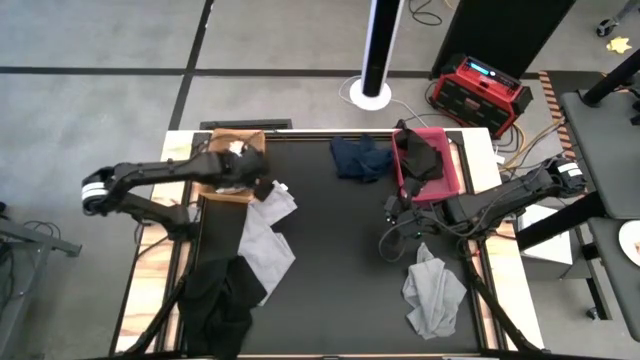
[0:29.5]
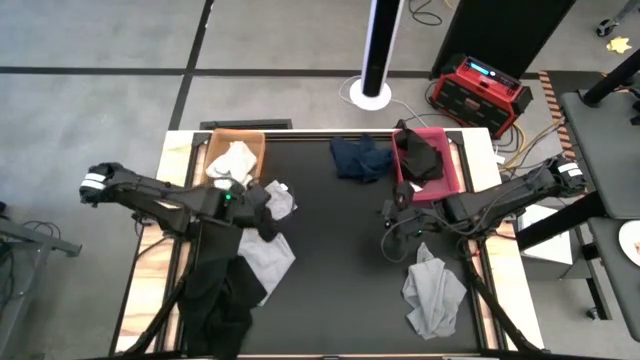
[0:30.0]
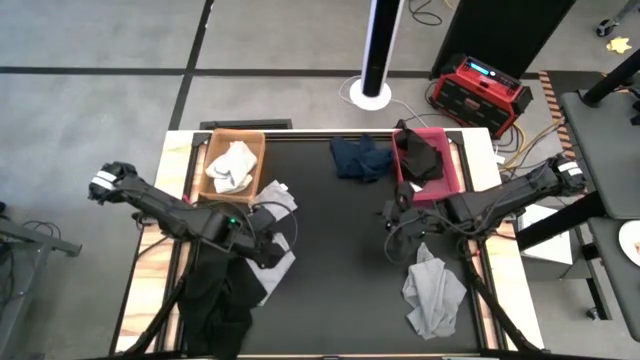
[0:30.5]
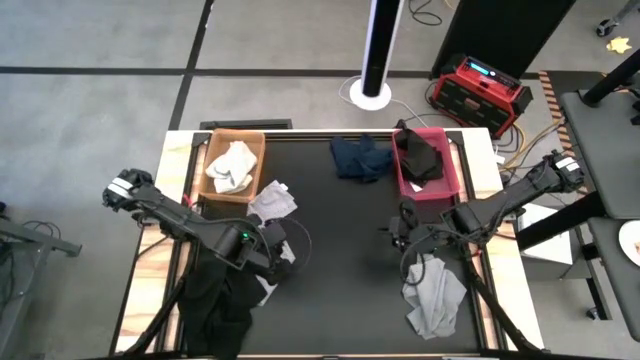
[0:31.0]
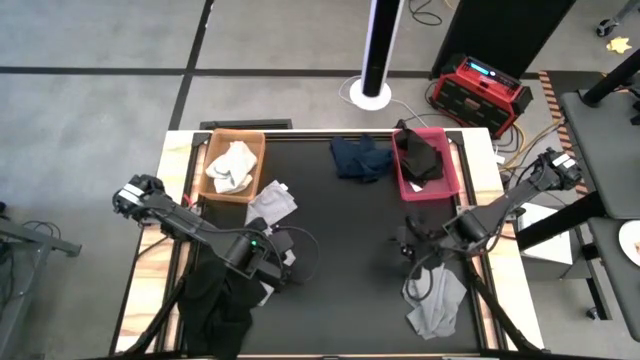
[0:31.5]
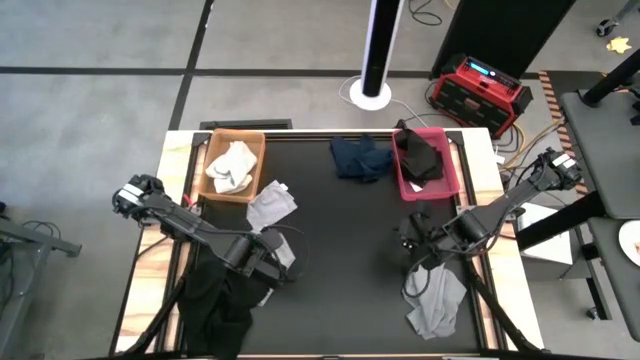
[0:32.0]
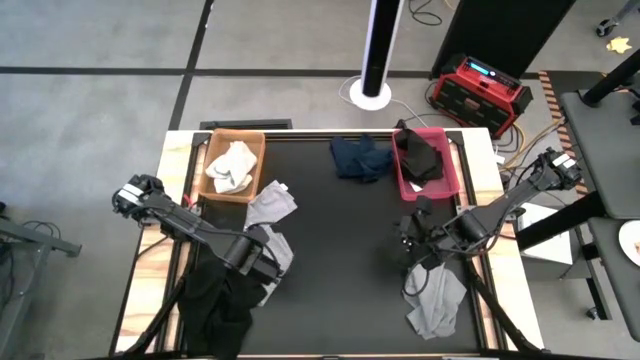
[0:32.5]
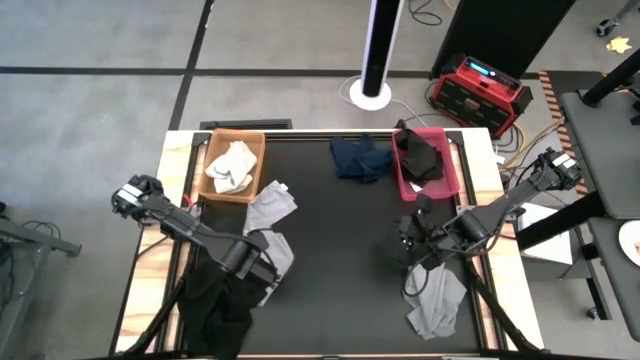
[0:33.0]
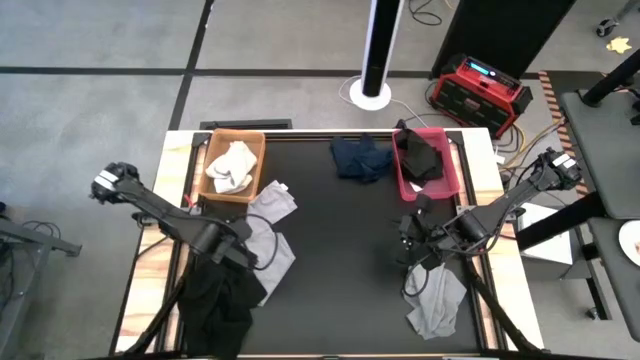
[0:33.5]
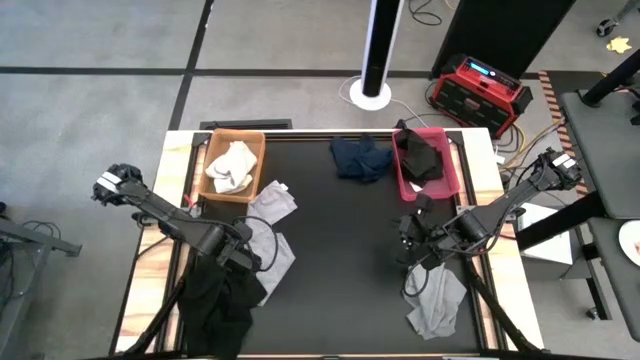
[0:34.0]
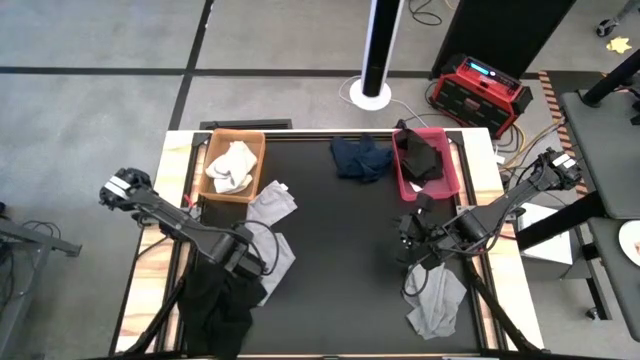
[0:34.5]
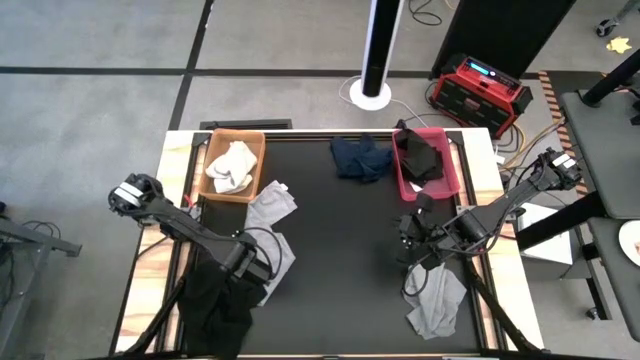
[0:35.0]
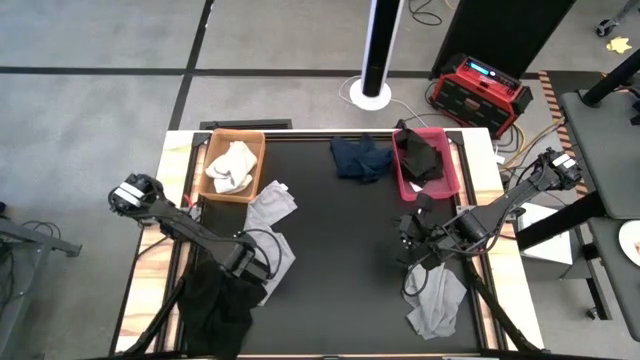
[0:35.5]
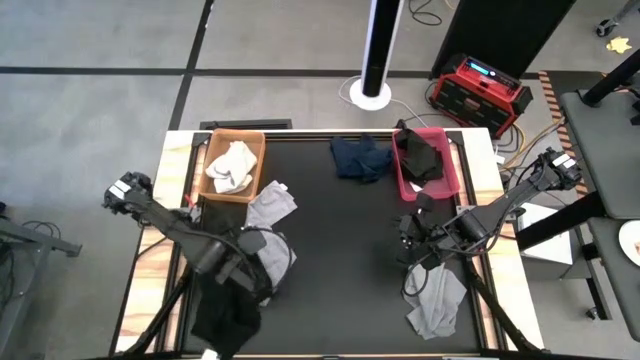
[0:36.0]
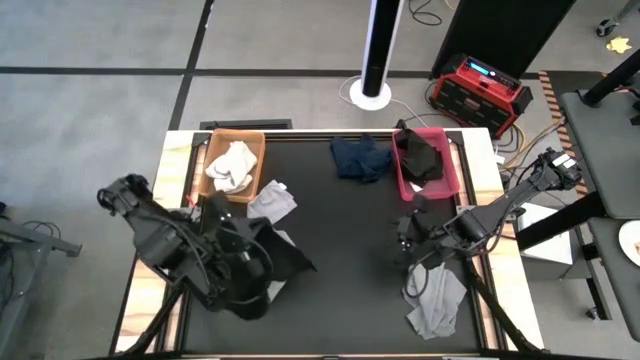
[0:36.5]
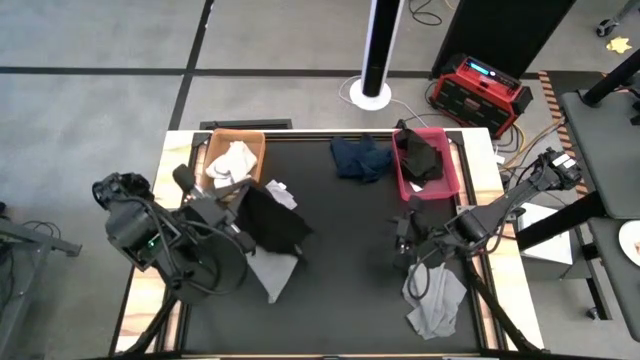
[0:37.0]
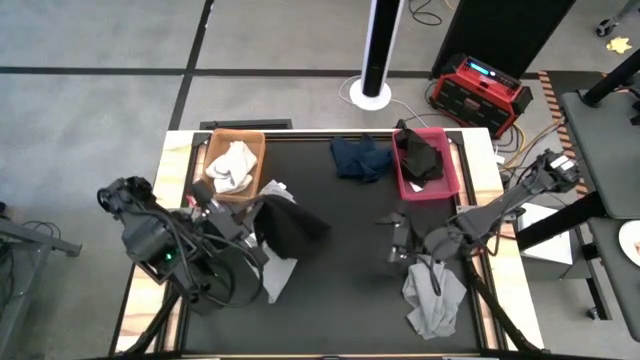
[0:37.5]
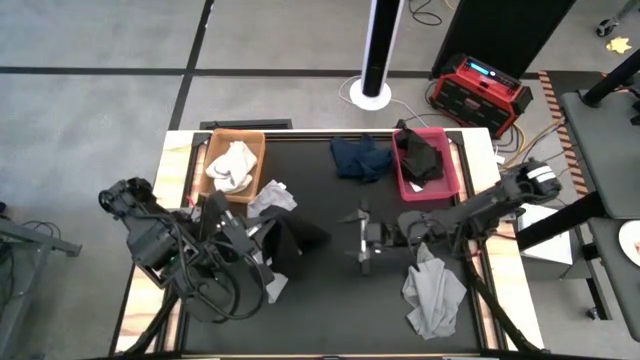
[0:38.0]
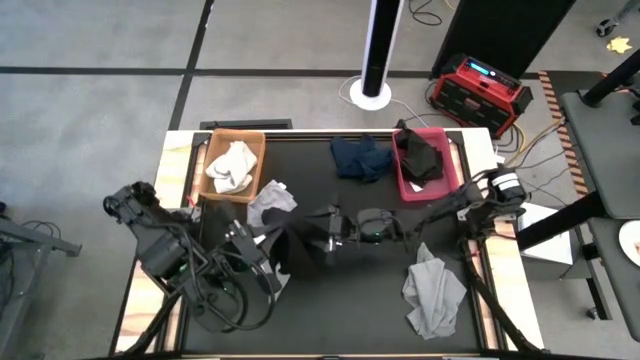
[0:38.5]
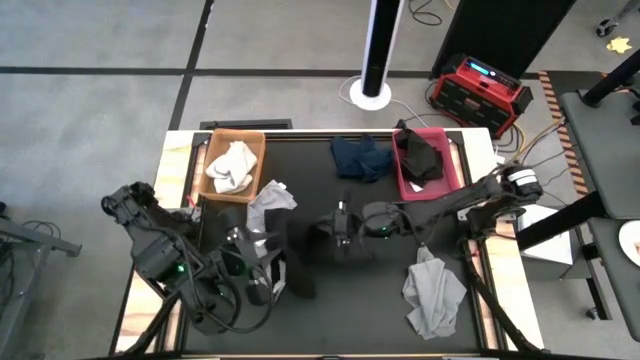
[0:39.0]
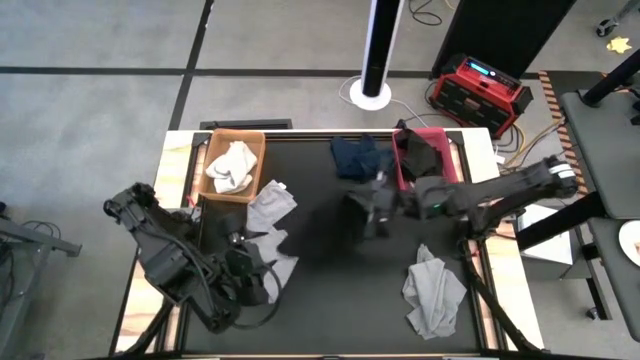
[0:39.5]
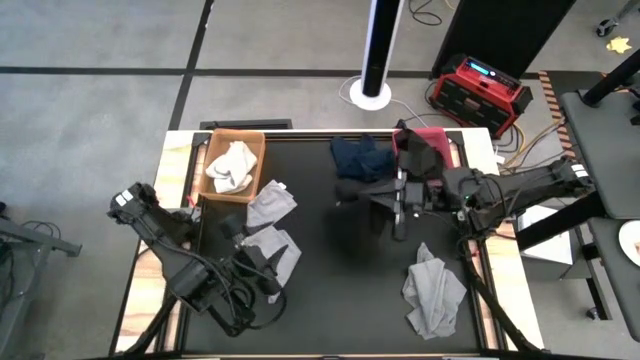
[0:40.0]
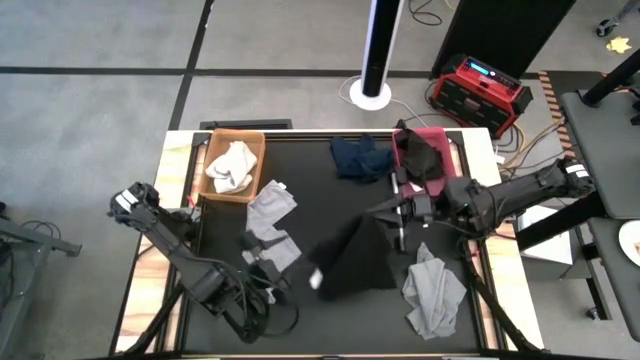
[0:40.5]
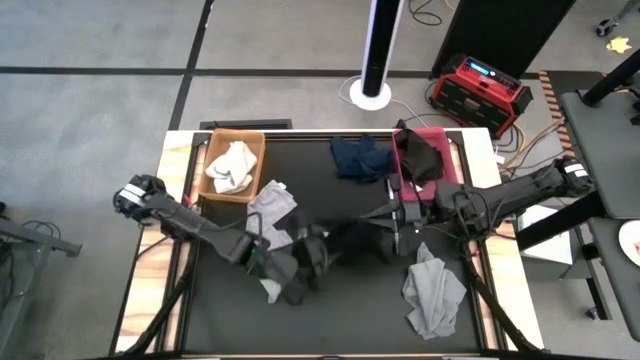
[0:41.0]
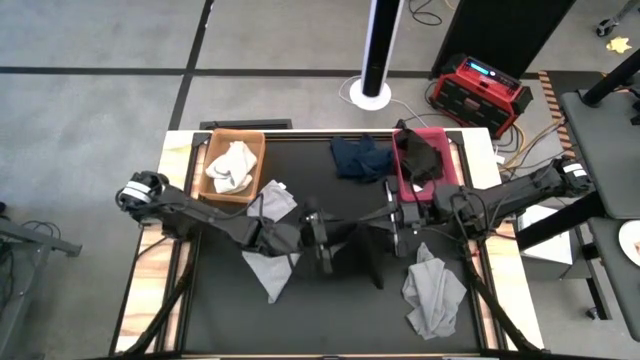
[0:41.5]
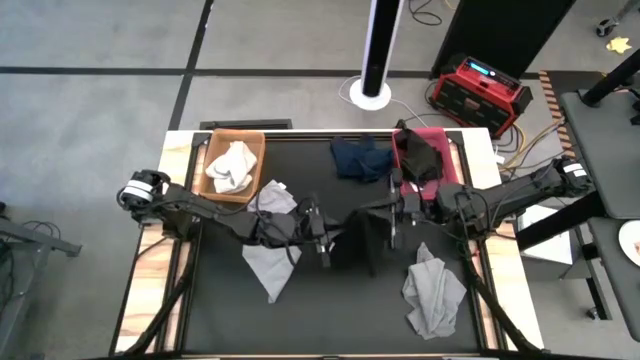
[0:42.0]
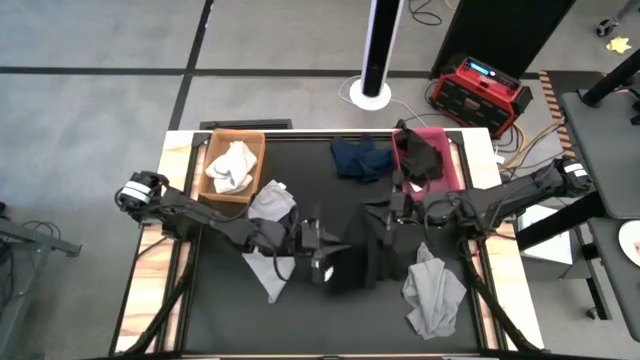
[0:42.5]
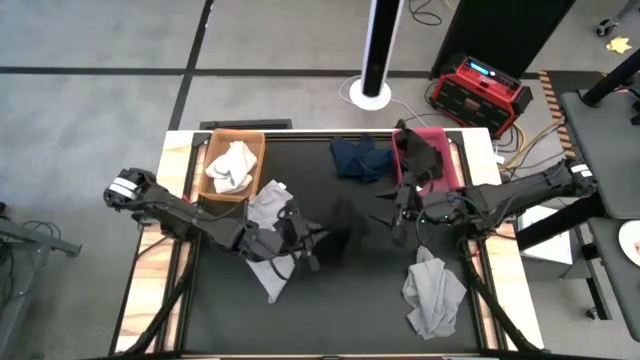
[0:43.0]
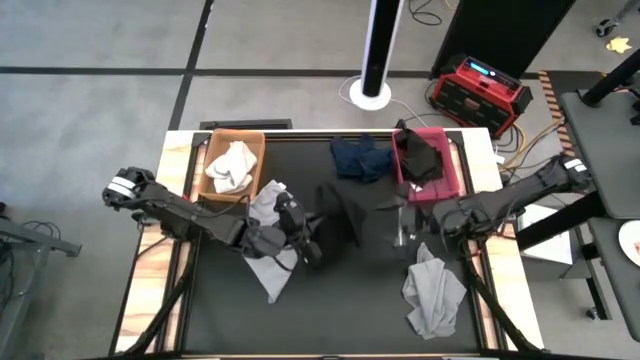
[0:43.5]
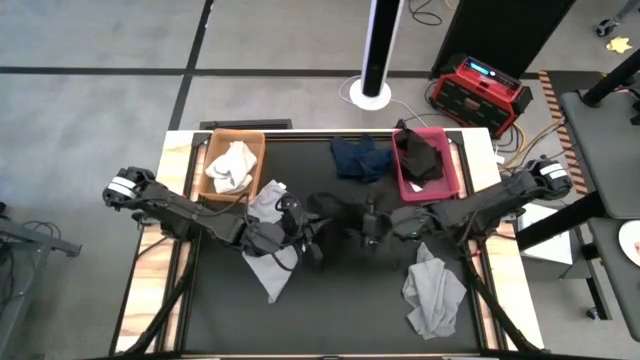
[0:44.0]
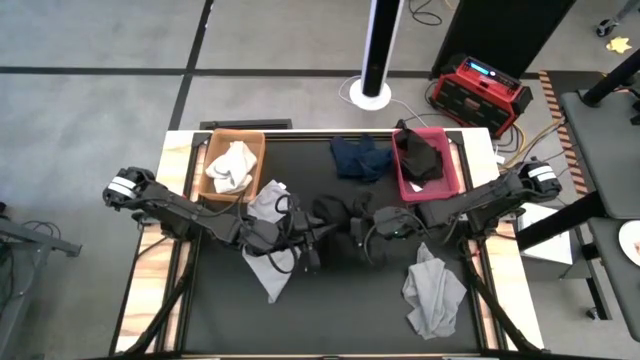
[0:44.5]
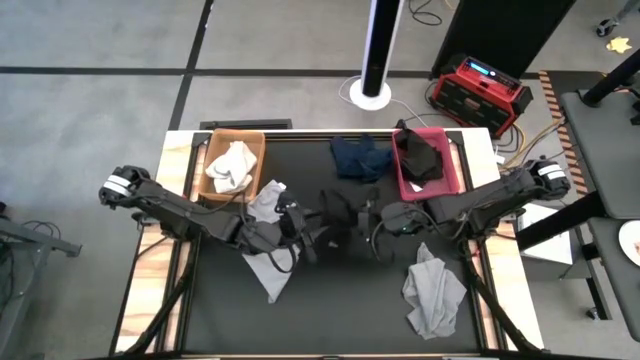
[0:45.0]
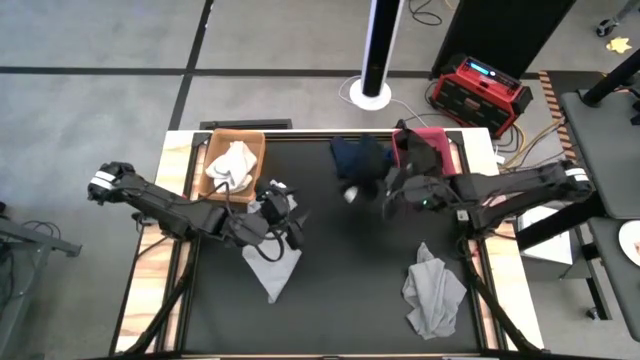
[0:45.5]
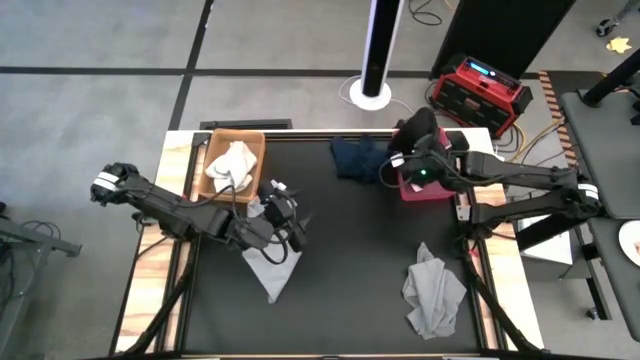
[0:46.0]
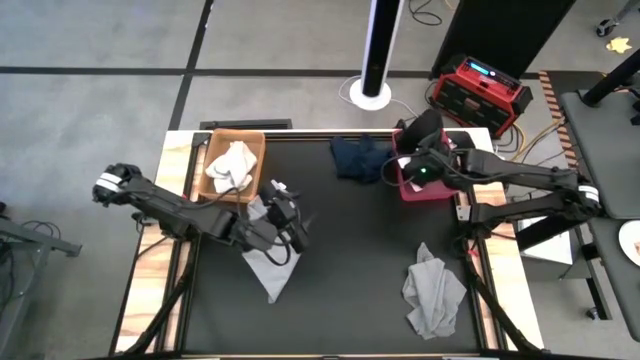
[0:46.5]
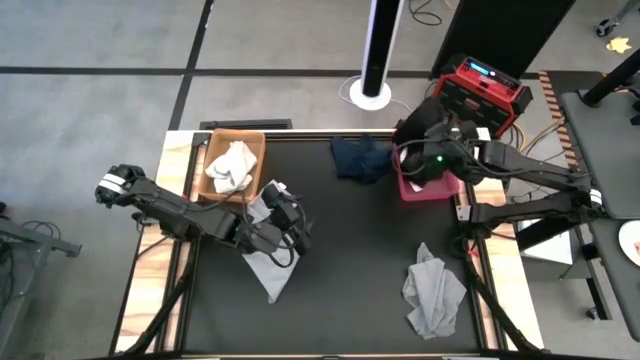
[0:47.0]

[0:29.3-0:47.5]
Task: Sort towels by color in basket
Put the black towel into the red bin

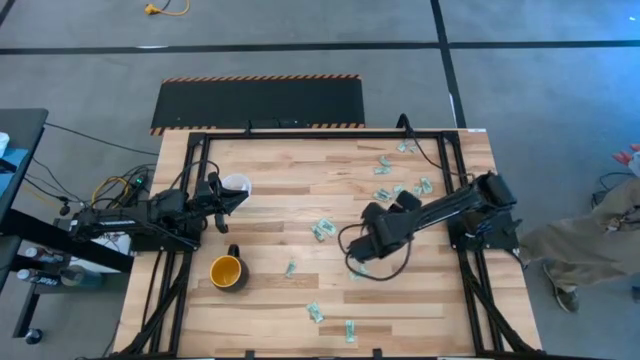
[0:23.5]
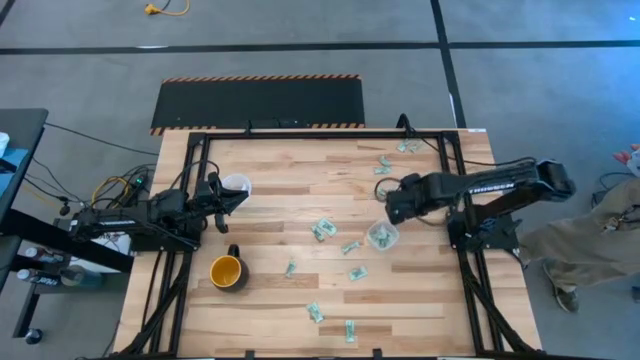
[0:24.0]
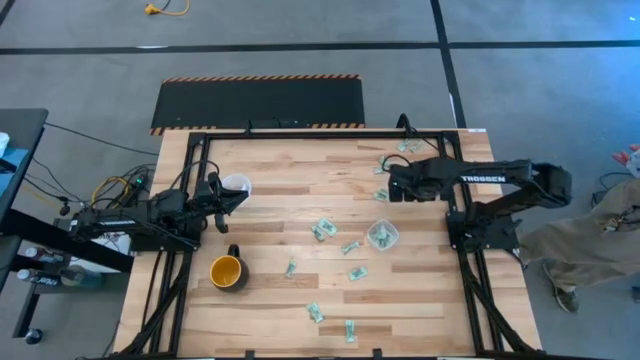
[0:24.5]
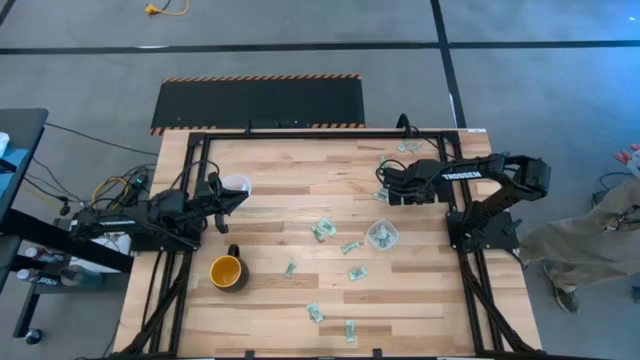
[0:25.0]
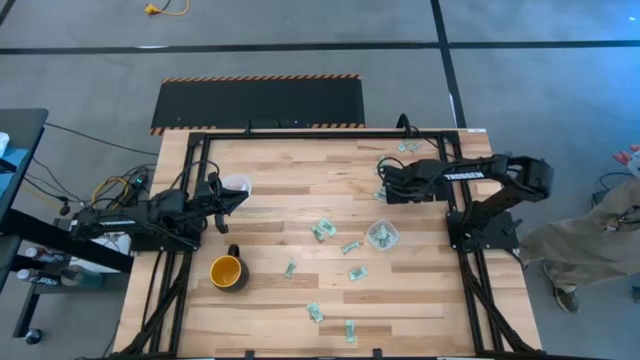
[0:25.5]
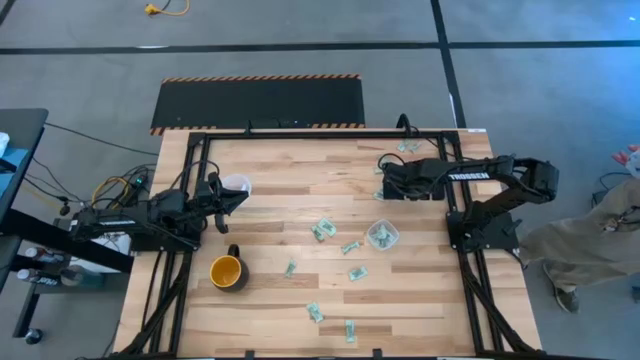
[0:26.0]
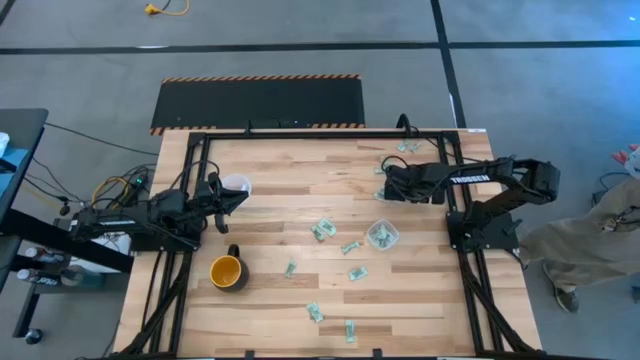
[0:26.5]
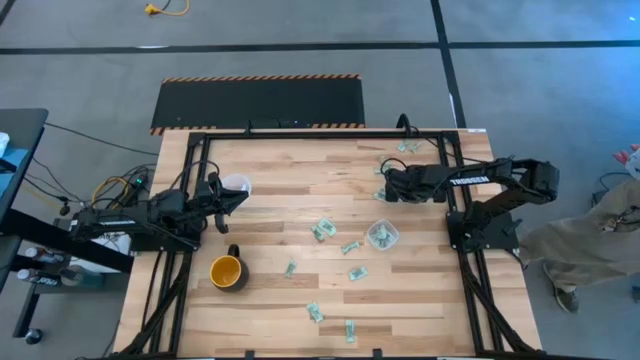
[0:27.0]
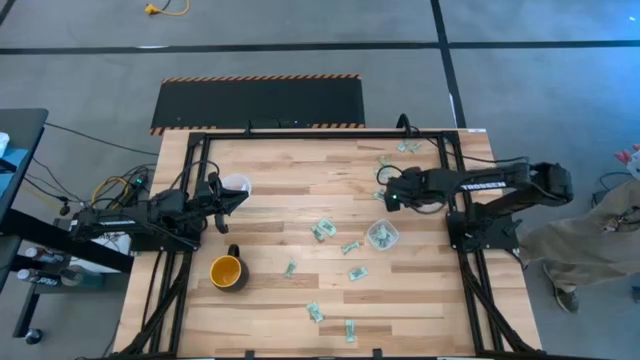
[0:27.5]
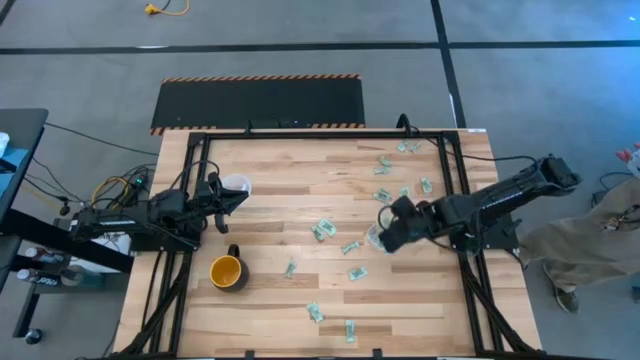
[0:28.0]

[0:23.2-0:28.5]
Task: Pick and place Stevia / Truvia into bins
Put the white stevia packet into the square transparent container
